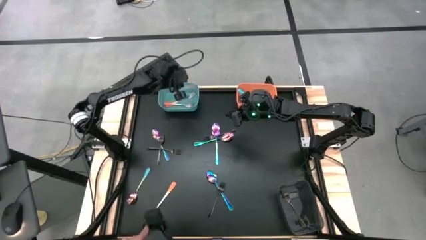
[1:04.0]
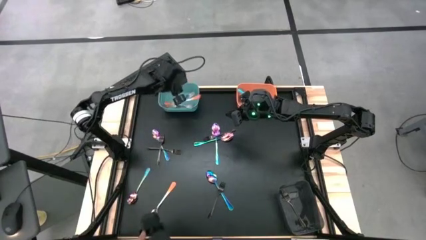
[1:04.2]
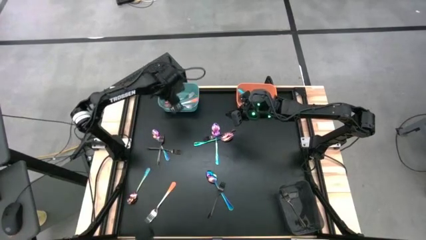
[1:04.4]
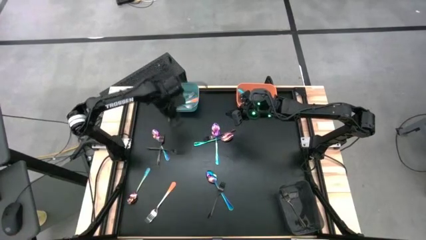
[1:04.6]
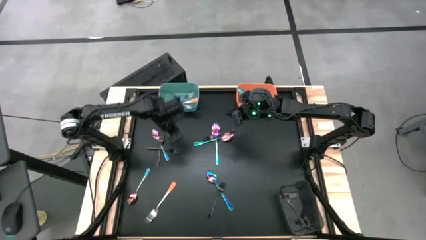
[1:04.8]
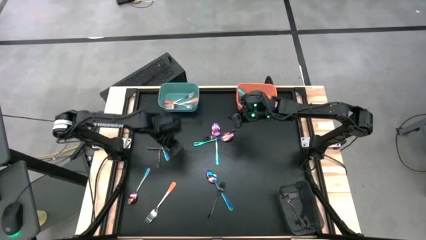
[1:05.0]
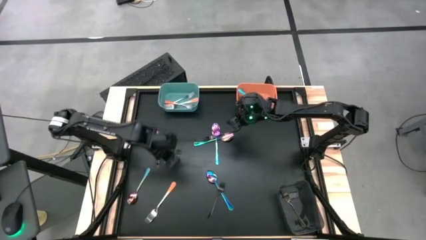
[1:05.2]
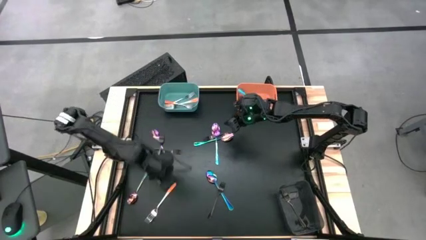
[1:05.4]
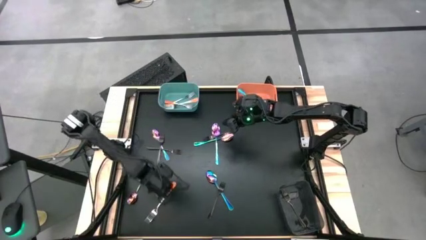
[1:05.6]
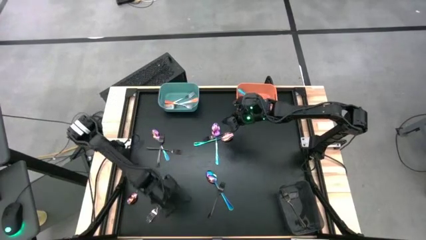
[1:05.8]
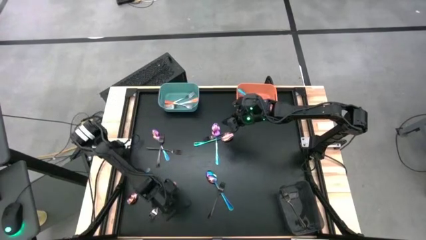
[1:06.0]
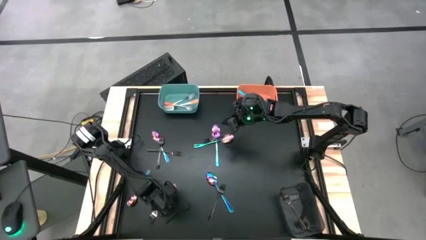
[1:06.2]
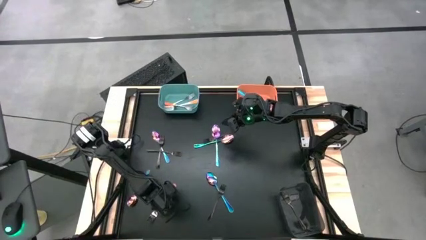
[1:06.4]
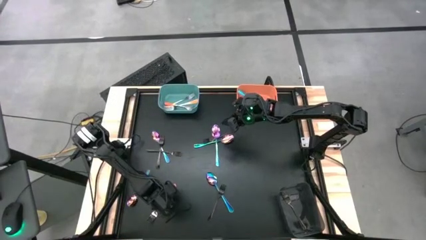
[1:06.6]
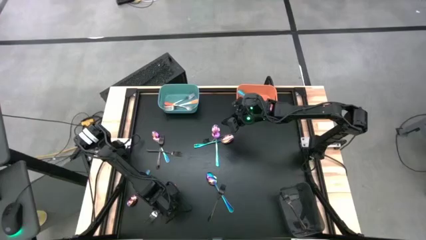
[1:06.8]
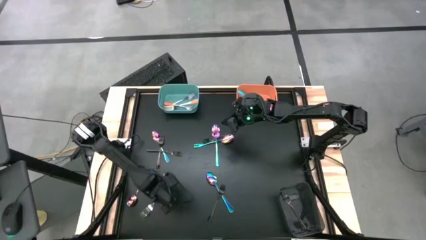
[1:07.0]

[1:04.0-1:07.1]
Task: Sort silverware by color (type)
Put the orange fork into the green bin

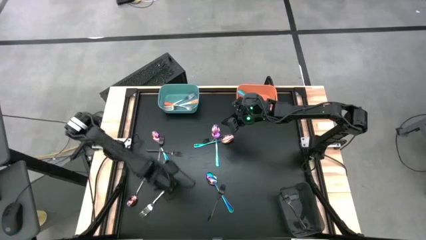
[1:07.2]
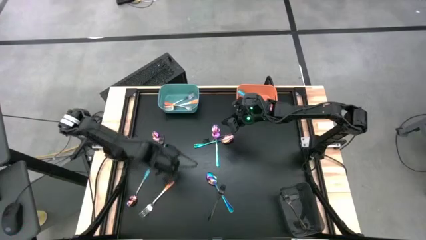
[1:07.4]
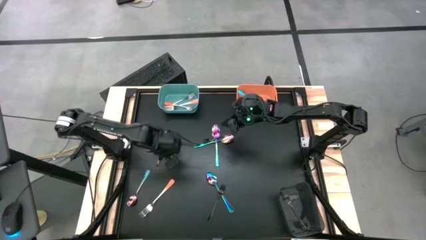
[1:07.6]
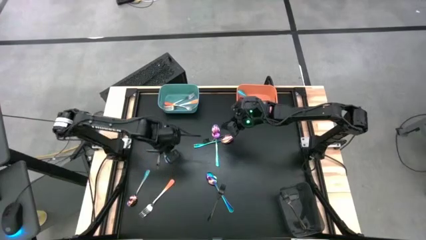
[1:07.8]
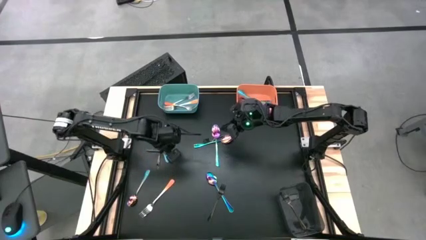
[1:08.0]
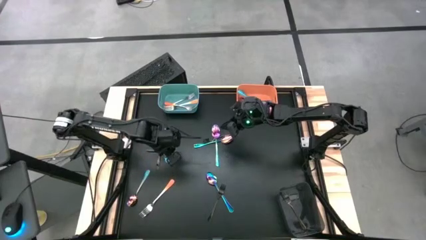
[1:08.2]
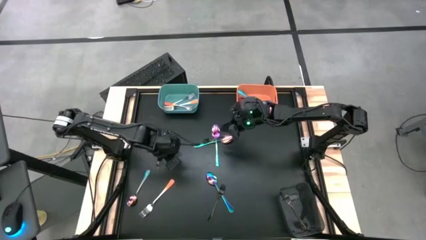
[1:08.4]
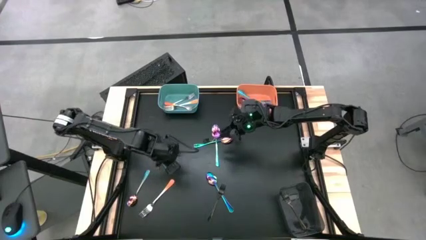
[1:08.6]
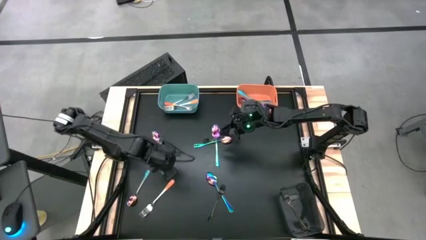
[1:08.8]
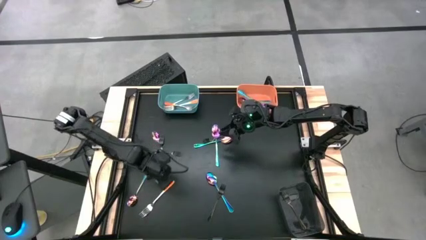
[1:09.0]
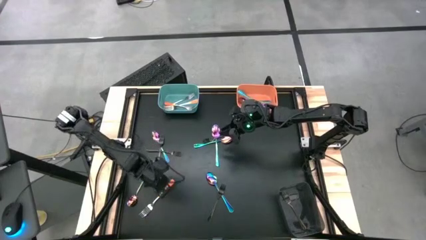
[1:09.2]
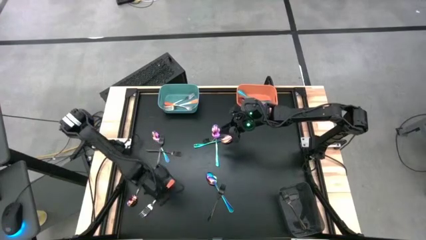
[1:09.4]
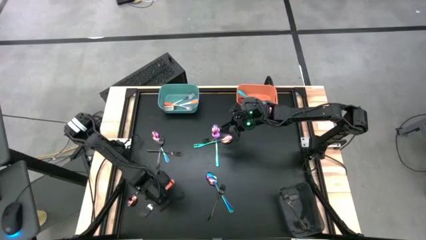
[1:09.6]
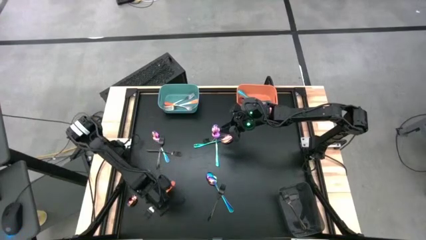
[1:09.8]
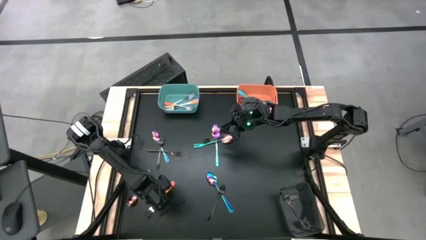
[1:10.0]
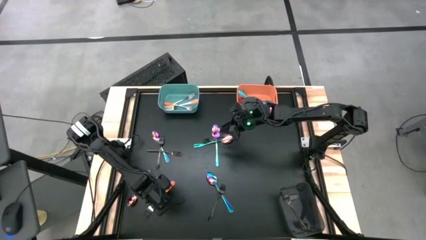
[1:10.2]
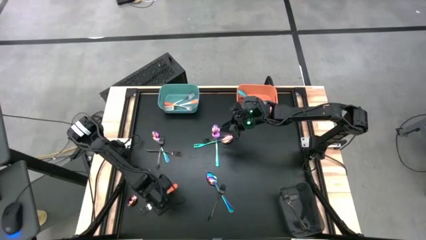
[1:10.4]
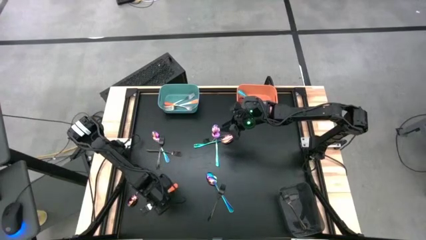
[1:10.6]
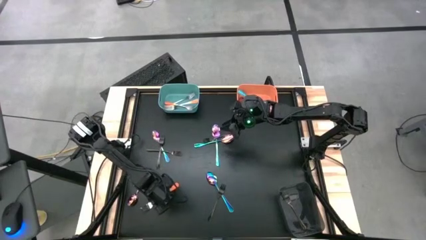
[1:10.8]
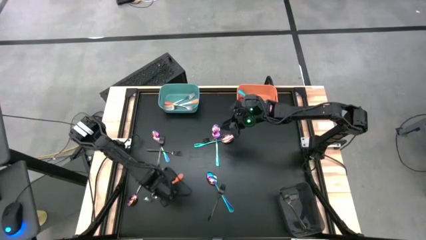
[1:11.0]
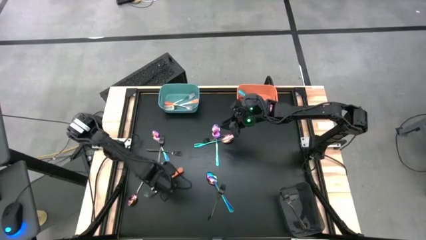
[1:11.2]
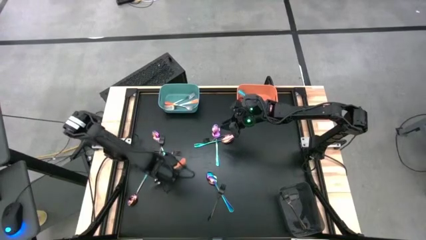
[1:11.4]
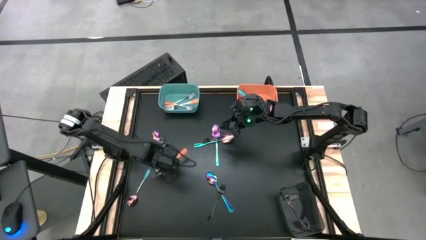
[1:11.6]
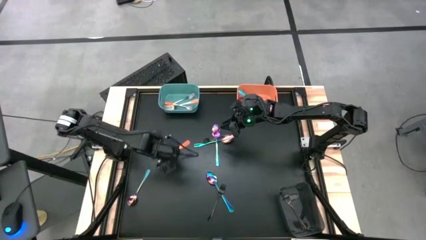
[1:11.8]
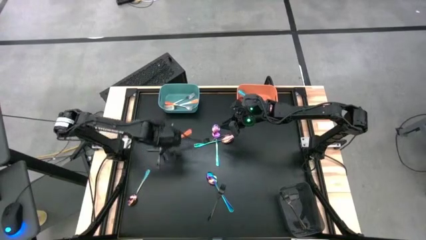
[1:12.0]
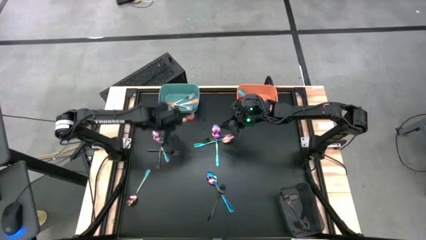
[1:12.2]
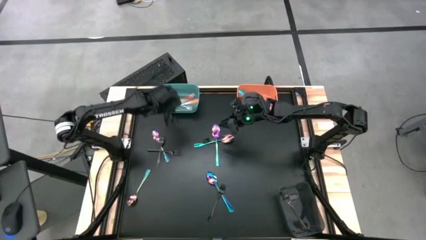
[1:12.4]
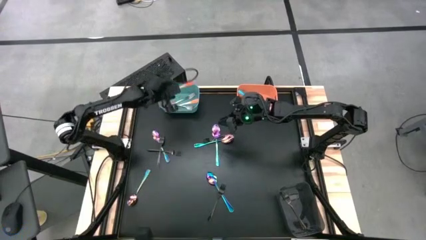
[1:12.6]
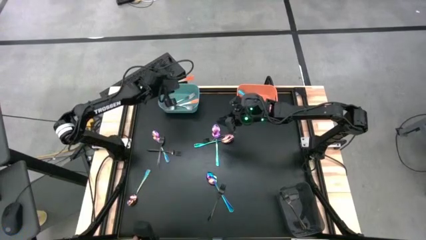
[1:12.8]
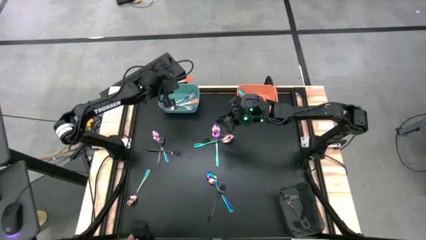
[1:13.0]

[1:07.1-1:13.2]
Put the orange fork into the green bin

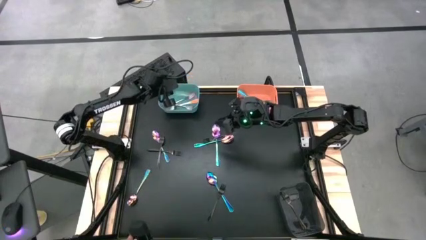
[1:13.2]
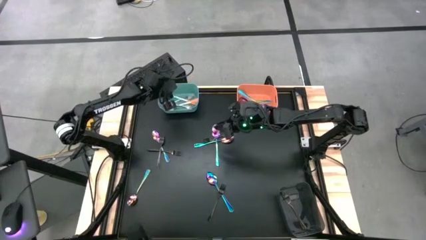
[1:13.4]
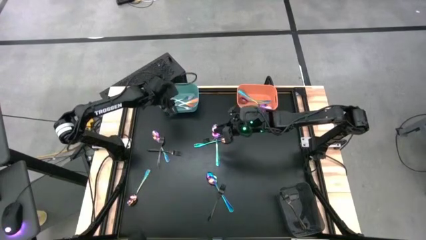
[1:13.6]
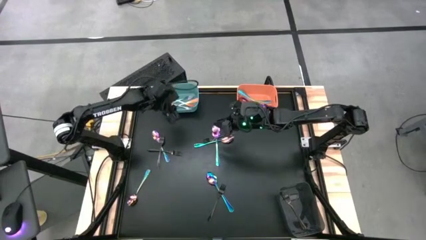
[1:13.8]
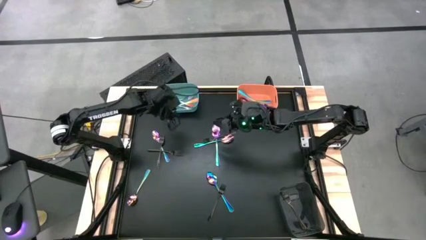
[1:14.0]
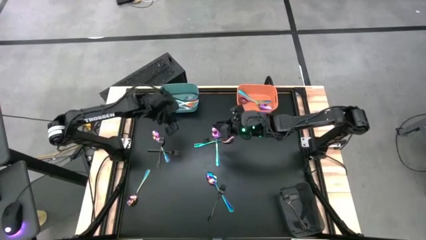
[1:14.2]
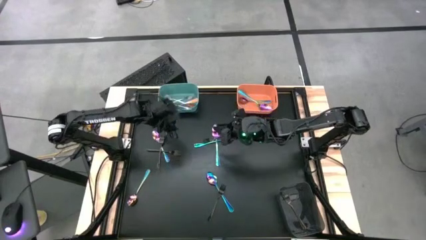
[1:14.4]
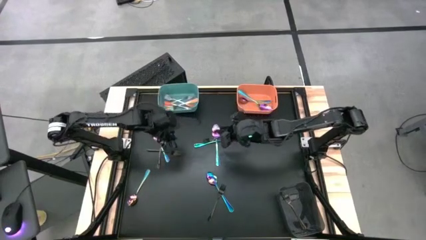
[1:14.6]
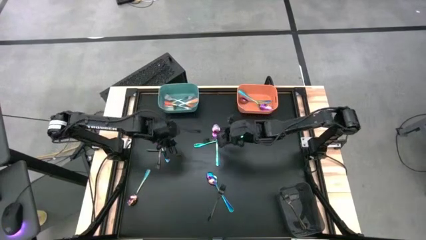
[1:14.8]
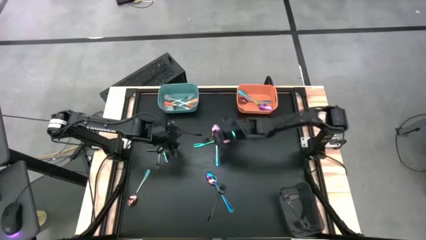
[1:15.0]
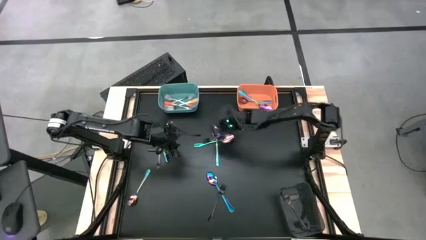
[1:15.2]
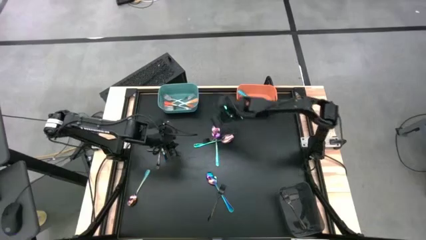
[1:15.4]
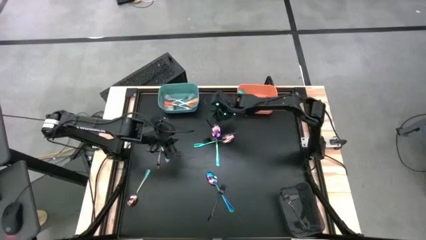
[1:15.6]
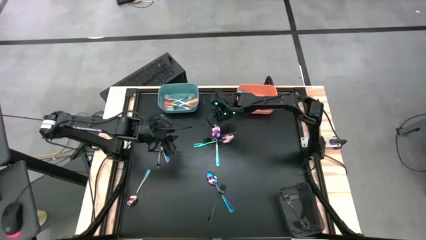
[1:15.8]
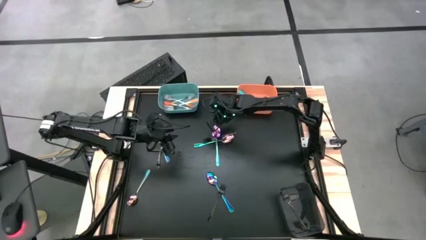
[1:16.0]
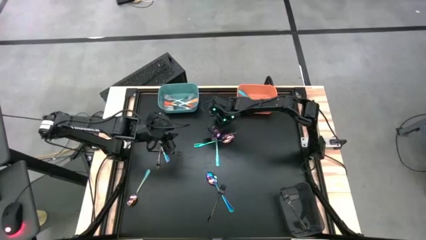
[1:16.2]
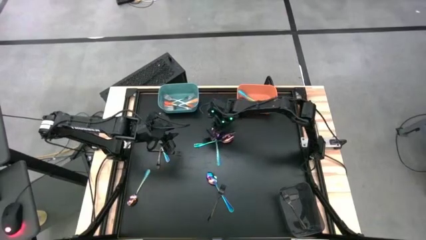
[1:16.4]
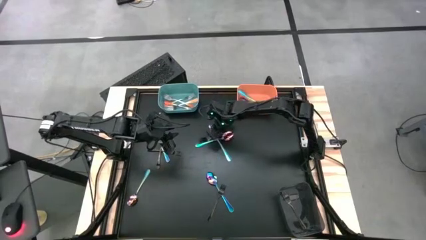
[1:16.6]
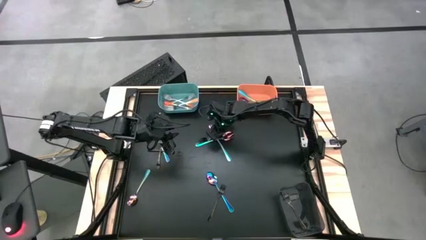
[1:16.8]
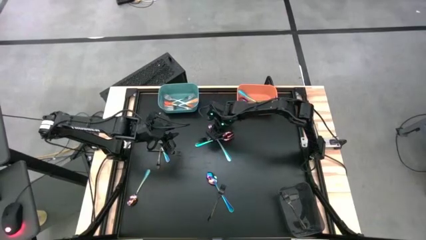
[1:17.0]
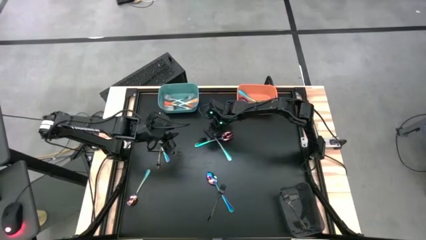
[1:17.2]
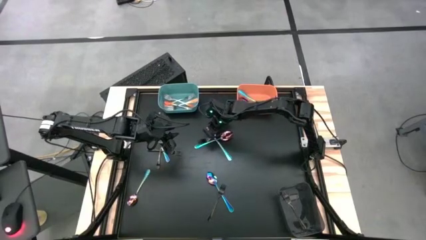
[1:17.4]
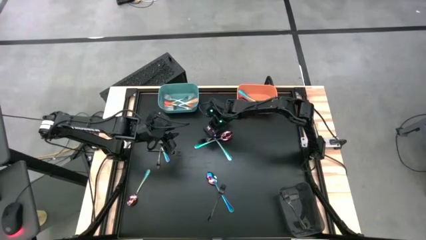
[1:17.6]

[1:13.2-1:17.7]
Put the purple spoon into the orange bin

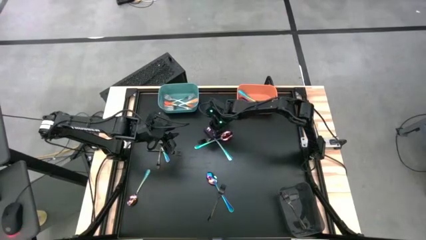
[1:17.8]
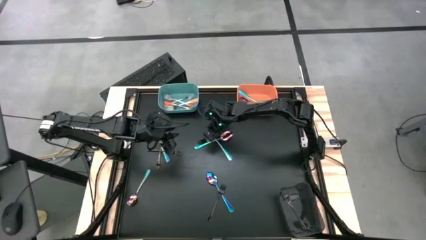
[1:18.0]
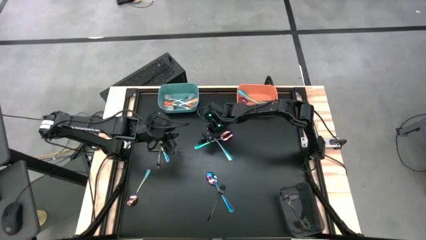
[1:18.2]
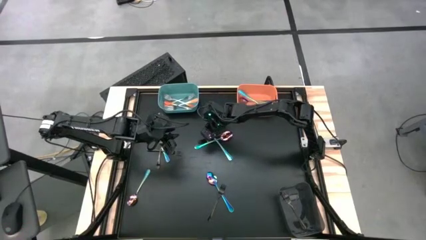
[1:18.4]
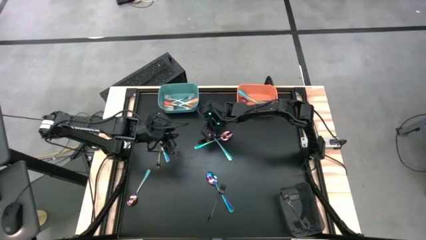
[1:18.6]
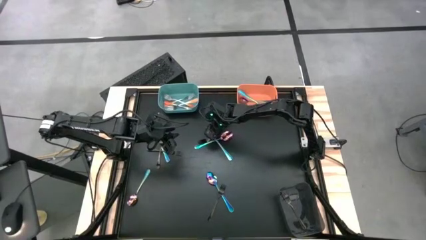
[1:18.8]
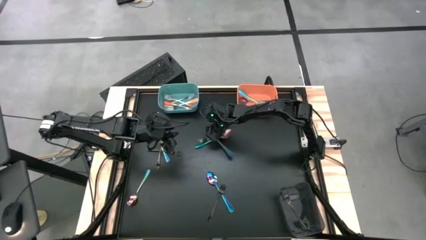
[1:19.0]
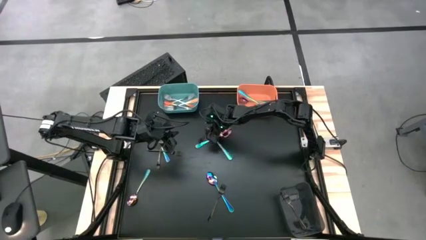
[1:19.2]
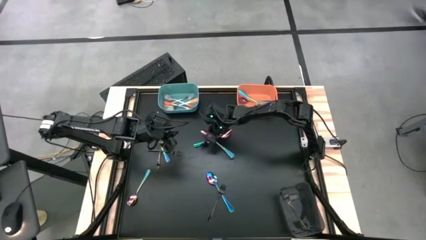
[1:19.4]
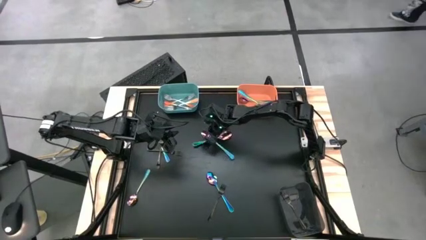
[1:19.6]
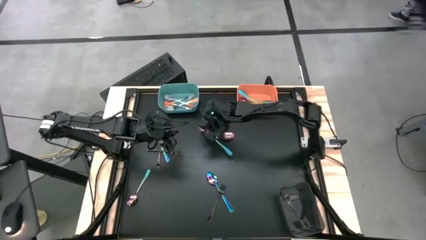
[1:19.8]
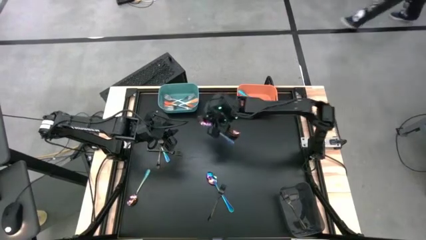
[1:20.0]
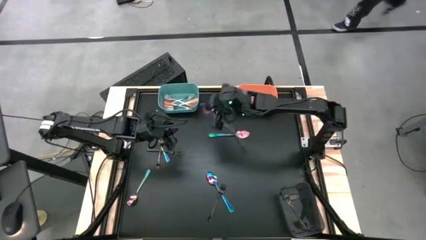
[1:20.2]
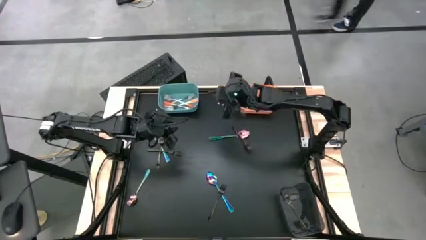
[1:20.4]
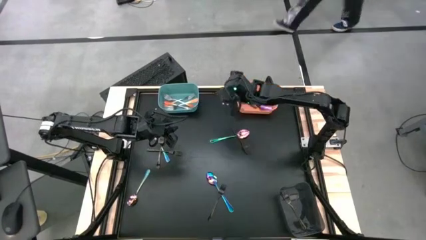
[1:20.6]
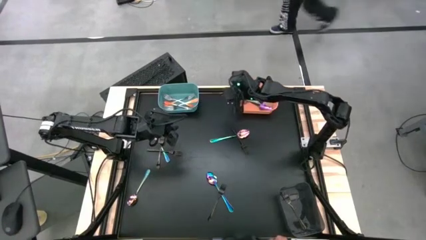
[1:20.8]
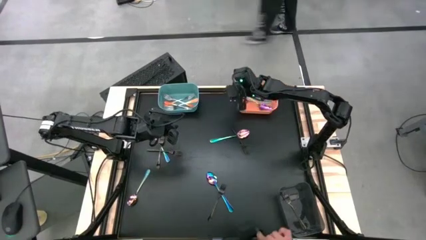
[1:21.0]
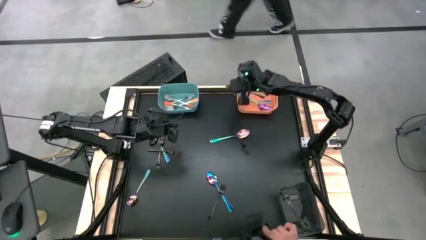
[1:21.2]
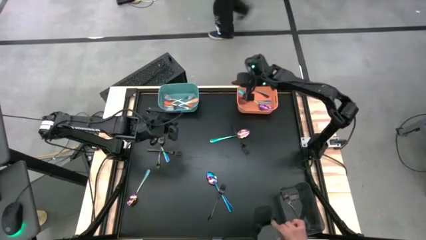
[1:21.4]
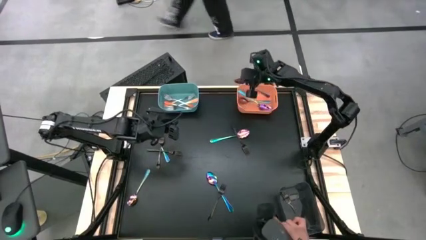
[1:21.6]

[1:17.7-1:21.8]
Put the purple spoon into the orange bin
